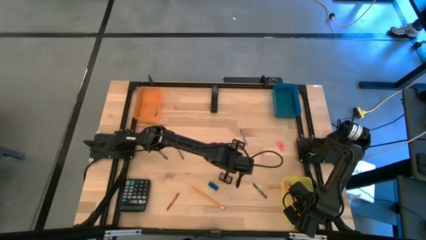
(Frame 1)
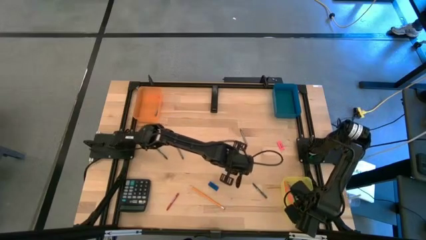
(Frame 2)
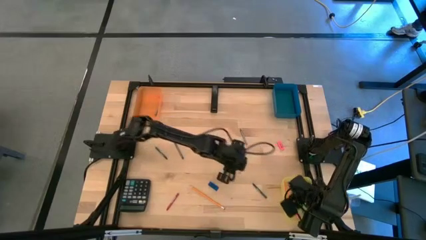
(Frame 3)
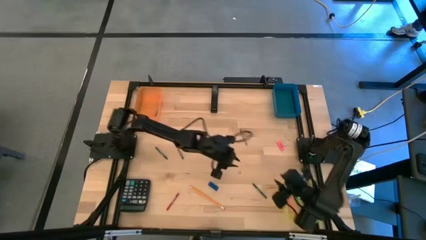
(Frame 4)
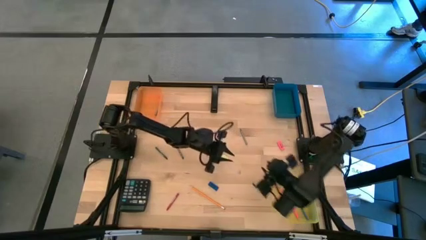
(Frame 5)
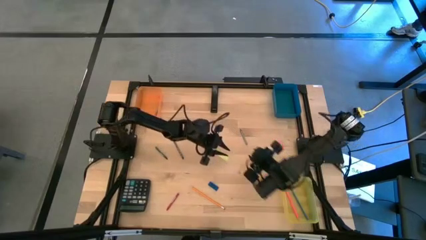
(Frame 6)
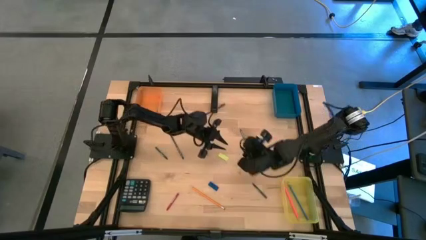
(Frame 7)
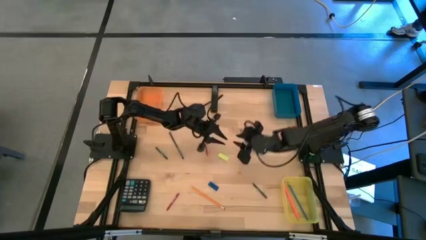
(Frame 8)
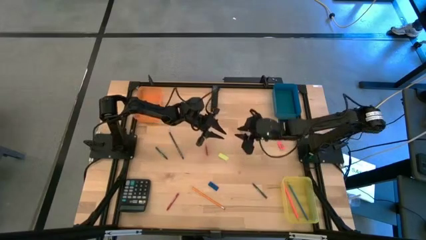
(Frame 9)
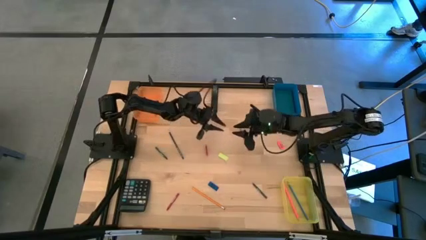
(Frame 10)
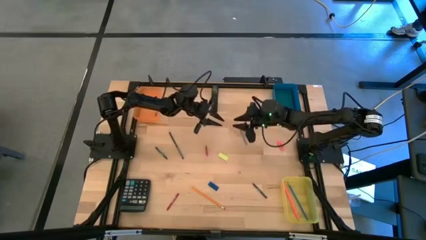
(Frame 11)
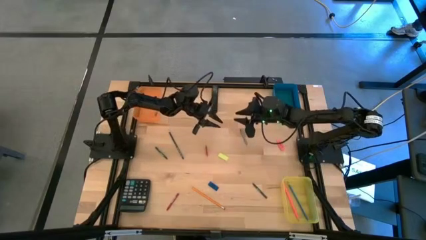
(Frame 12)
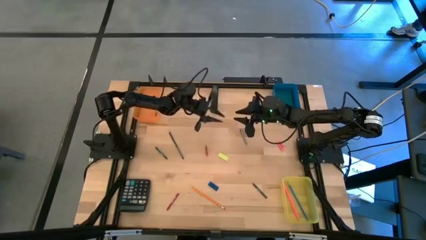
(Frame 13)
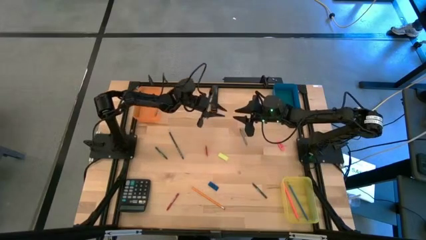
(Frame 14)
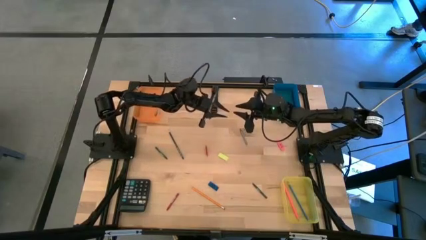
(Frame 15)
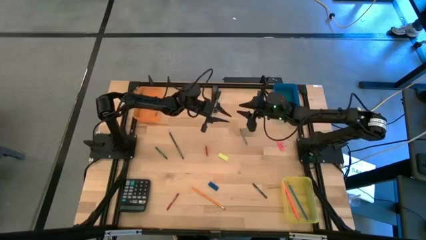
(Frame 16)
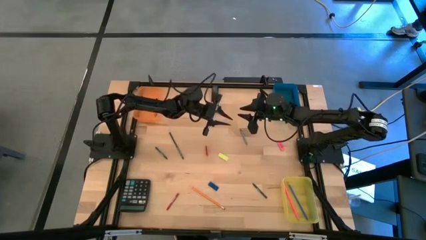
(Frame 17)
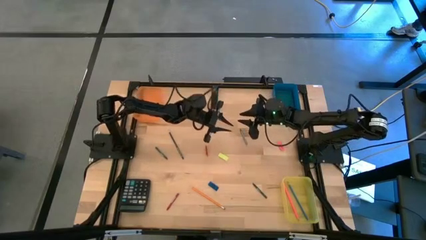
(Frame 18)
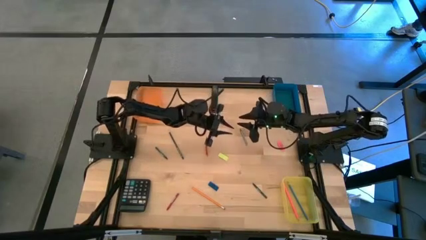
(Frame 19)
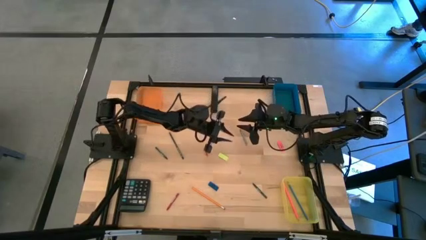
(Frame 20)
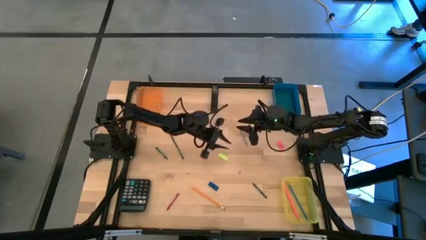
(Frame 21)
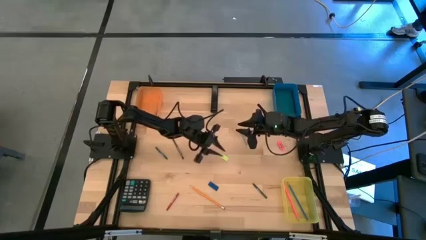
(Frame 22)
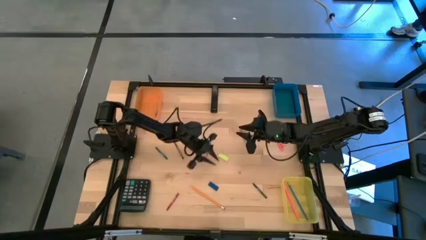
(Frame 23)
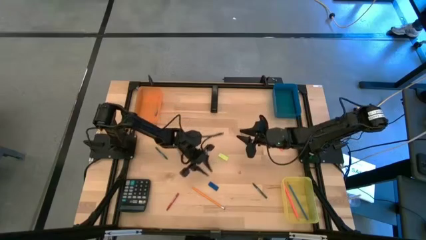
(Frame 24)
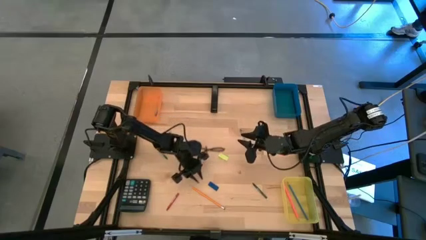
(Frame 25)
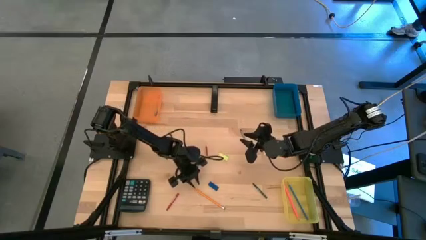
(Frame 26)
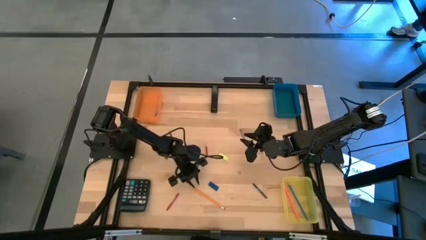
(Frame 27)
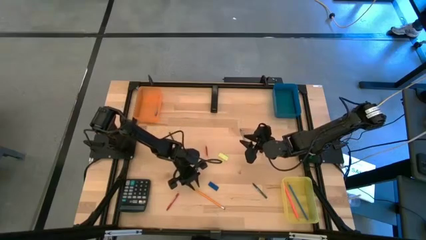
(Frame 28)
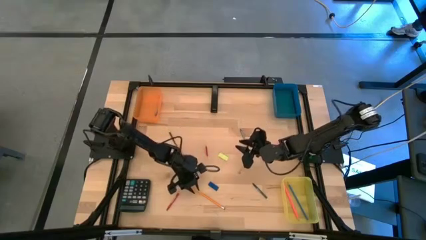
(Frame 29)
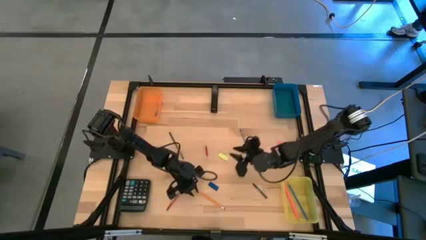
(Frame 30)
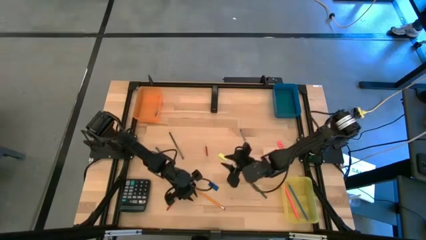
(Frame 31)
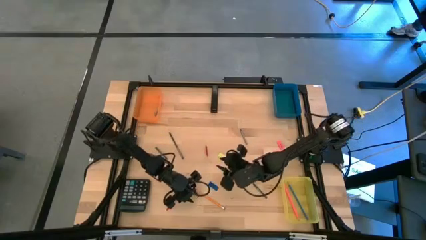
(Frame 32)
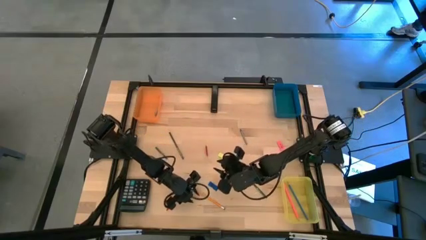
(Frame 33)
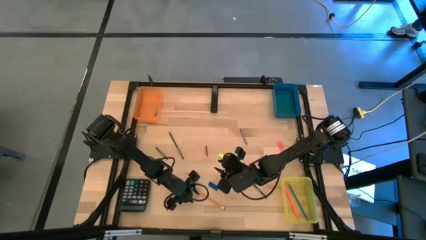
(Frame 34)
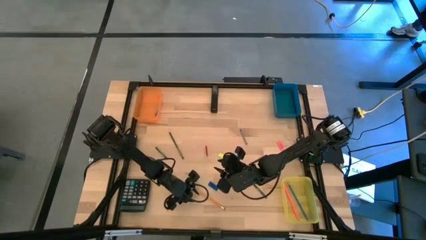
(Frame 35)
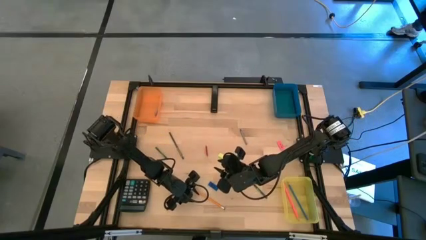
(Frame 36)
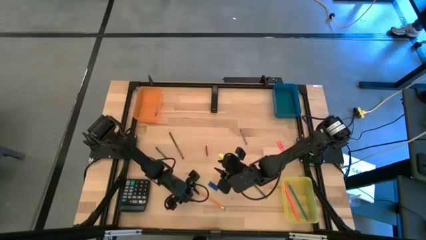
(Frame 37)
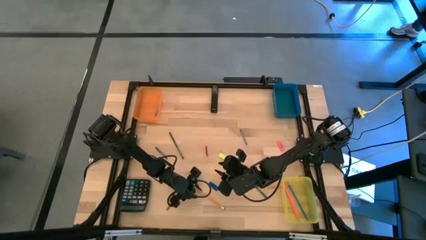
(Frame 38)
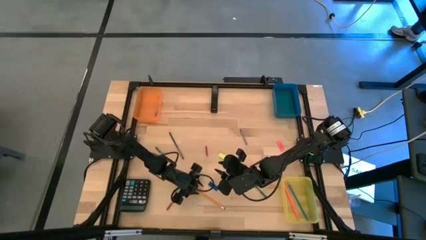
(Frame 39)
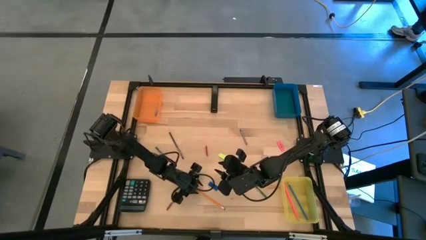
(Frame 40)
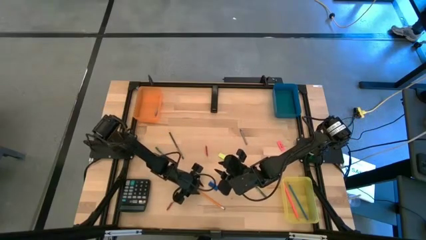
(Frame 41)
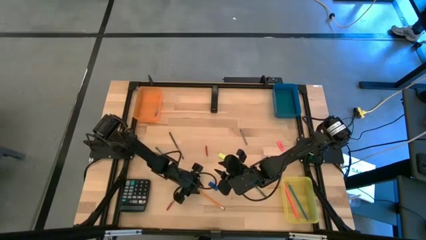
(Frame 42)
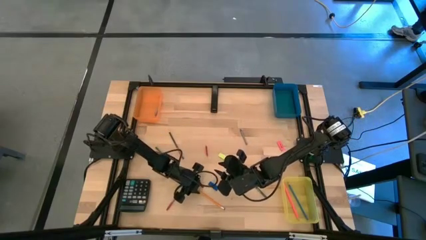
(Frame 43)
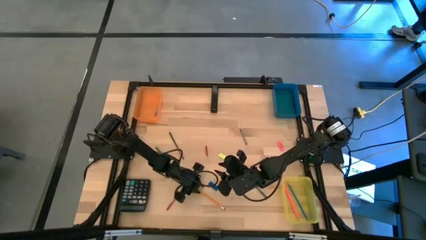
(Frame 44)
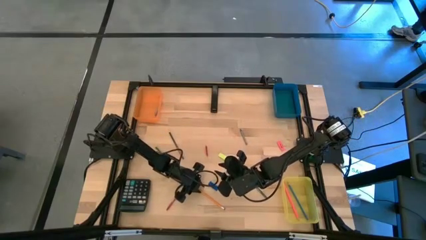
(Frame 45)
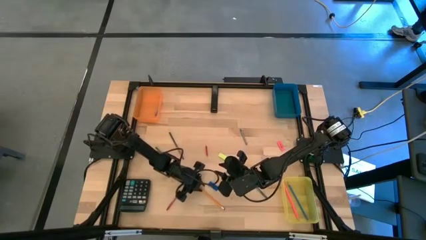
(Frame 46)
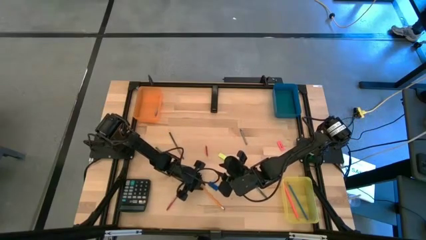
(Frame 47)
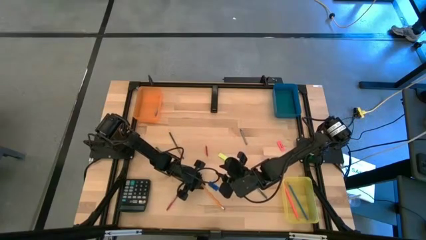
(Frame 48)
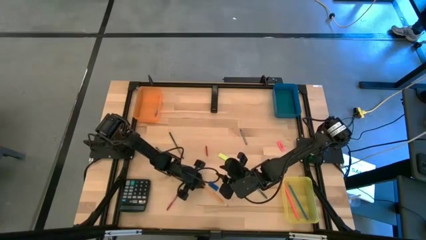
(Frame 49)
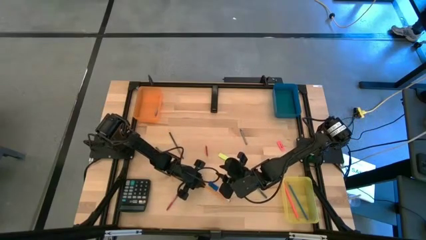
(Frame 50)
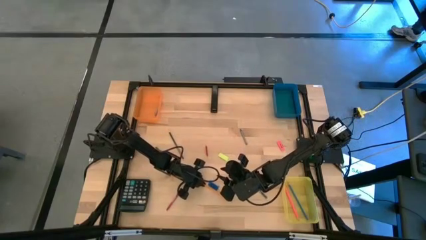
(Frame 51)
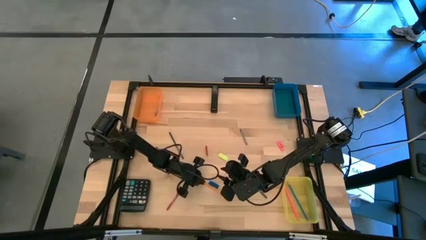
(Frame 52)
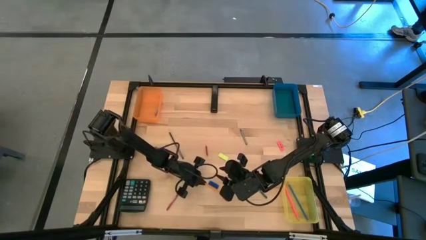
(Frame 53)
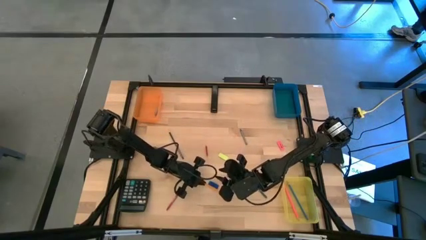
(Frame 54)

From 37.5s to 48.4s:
Task: Sort crayons/erasers/pens/pencils in bins
Put the yellow pencil into the yellow bin

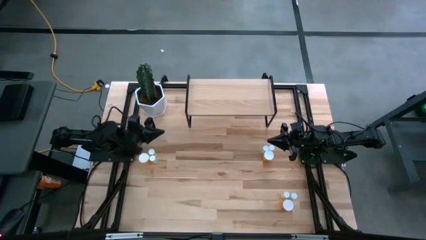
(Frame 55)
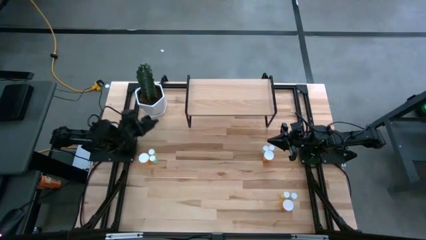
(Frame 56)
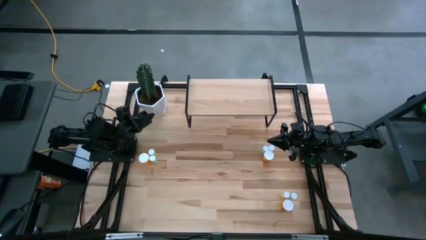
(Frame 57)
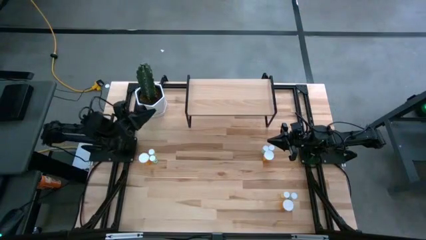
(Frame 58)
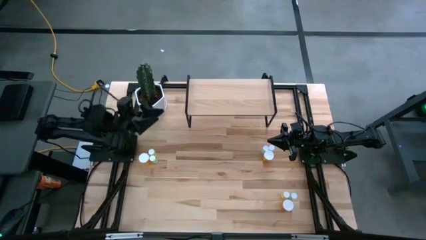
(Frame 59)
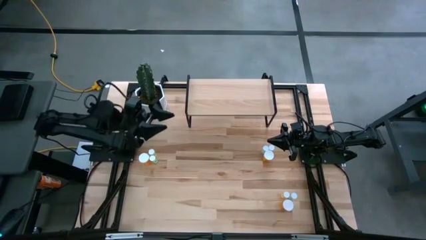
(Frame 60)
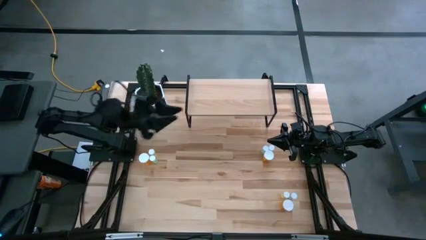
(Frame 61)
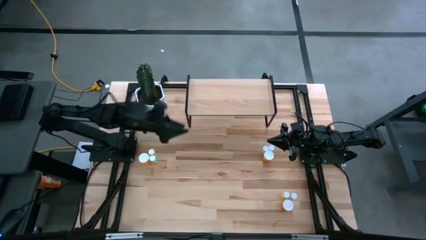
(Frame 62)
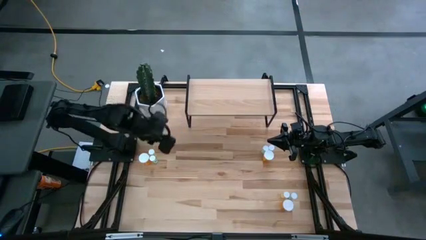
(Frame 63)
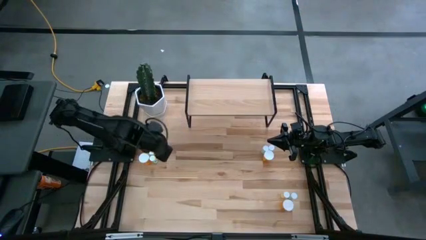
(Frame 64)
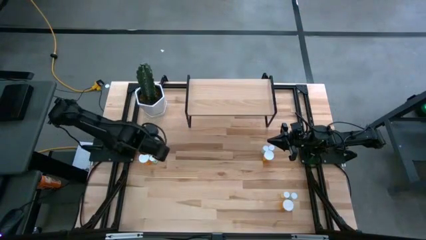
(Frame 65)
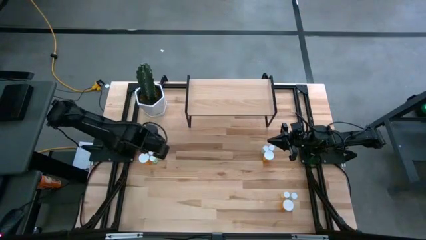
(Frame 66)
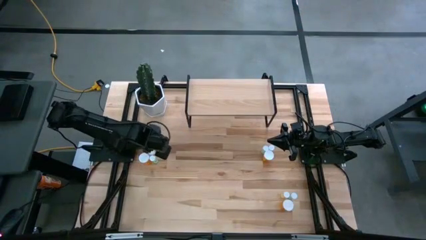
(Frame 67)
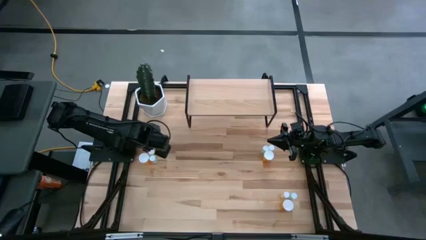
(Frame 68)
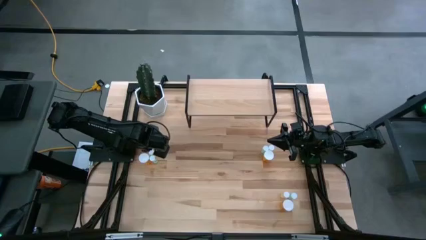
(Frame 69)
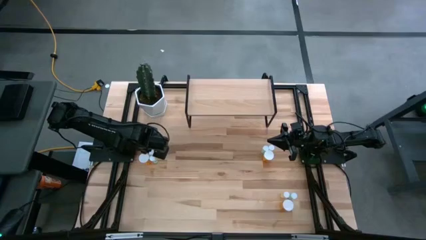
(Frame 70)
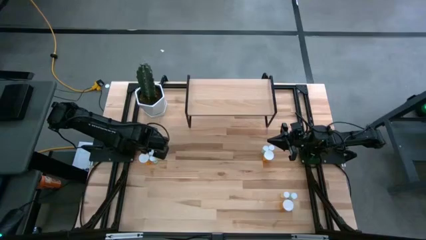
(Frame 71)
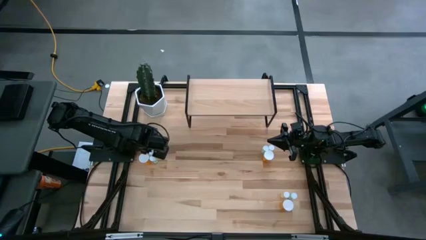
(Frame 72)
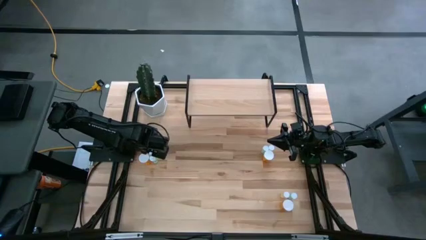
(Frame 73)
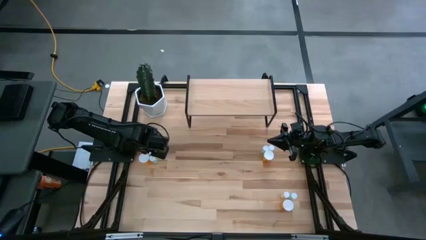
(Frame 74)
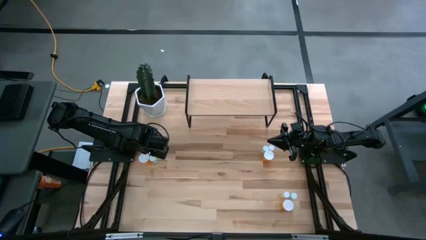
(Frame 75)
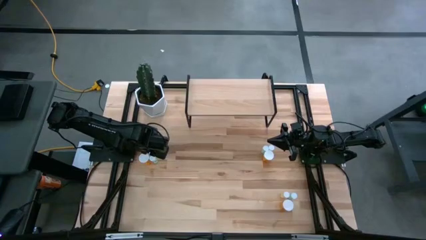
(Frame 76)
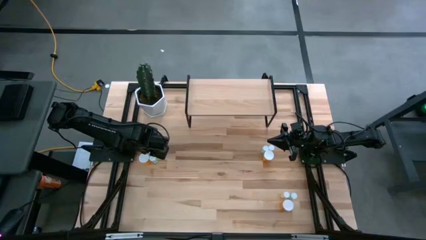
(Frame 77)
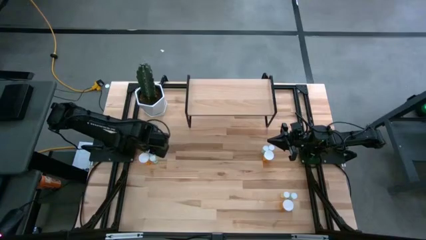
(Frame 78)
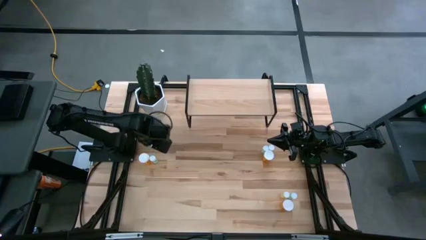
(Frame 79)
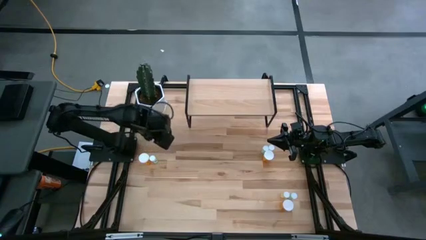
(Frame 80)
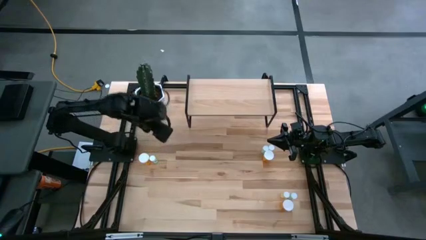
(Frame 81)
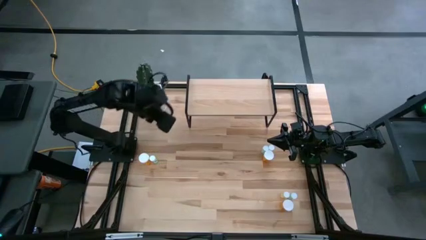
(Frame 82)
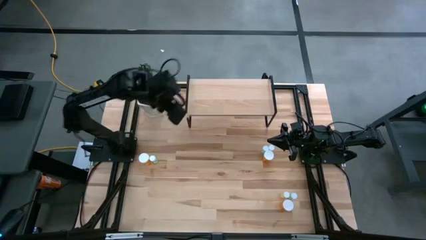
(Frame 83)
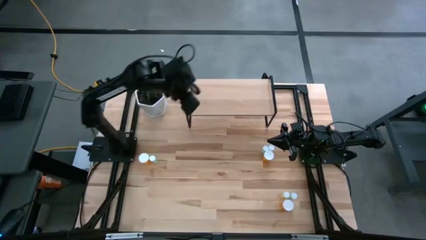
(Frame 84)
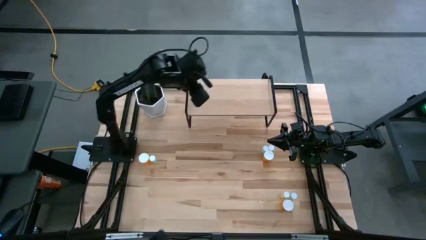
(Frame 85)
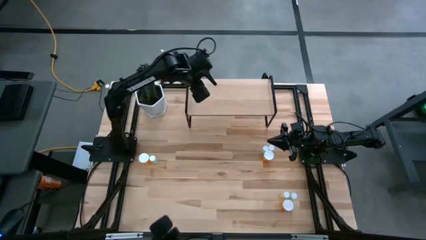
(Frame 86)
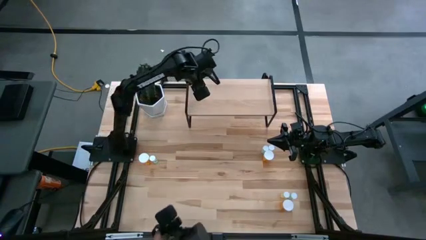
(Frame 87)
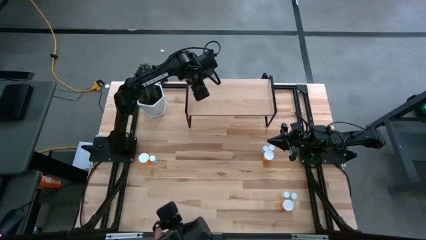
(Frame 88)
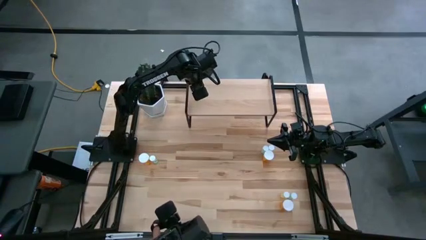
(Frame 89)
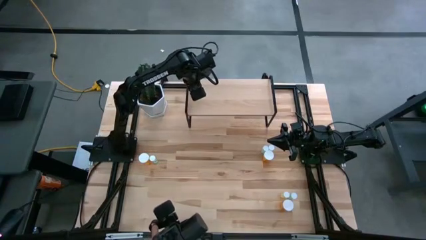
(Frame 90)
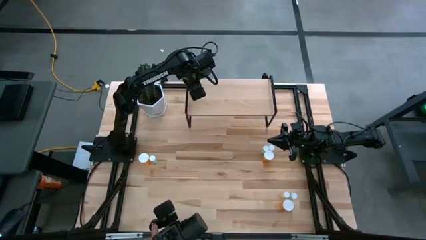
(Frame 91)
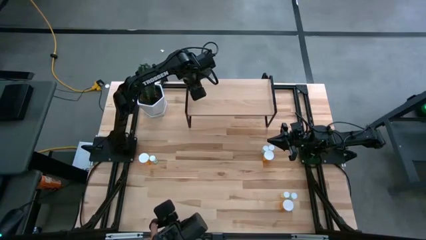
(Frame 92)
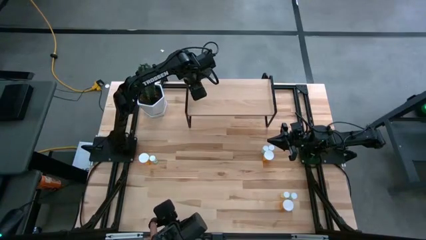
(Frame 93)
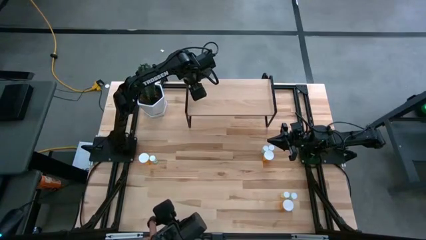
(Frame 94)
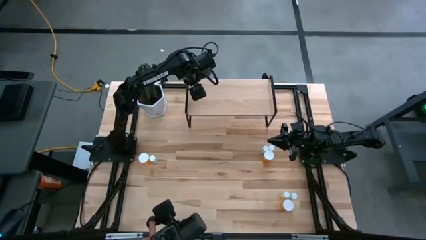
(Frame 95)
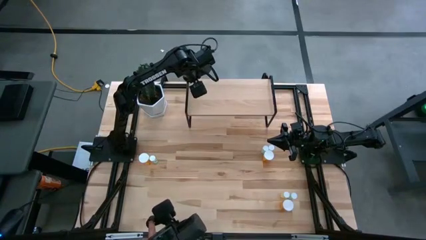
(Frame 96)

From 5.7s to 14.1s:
Task: Pick and place medicine bottles onto shelf by color
Put the top left yellow pill bottle on the shelf
